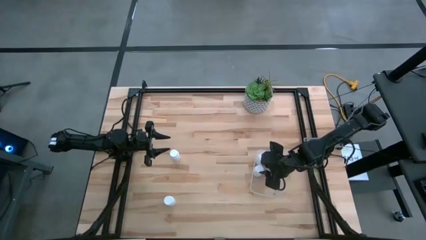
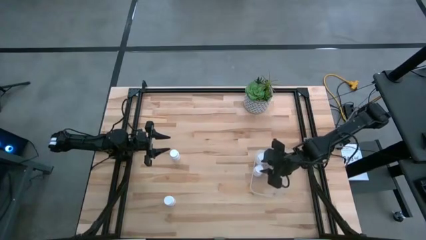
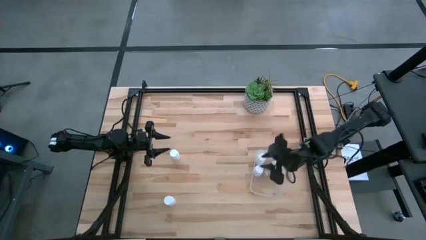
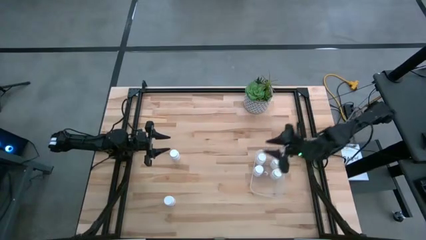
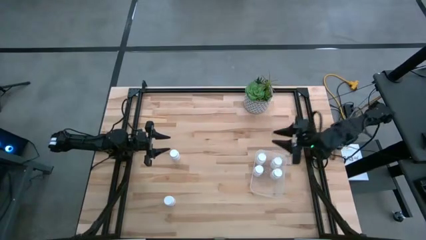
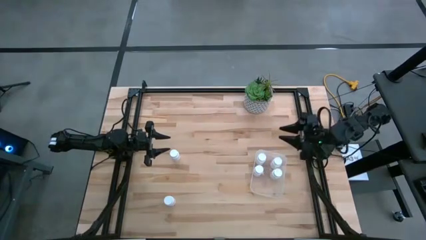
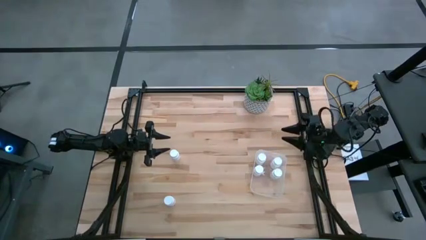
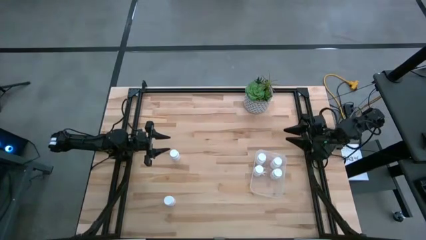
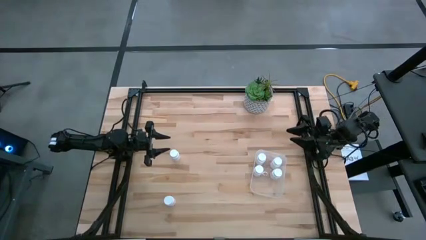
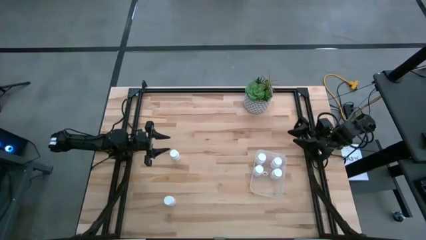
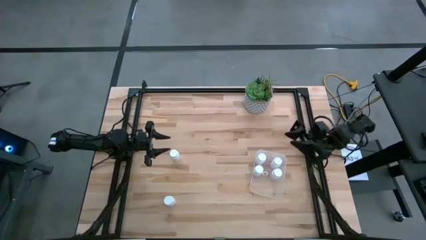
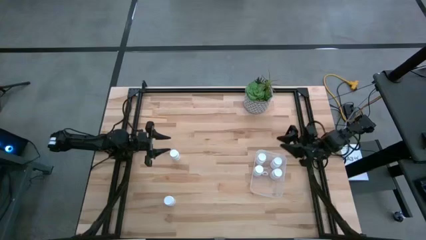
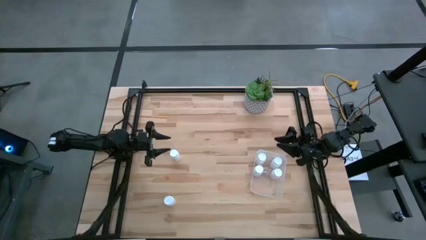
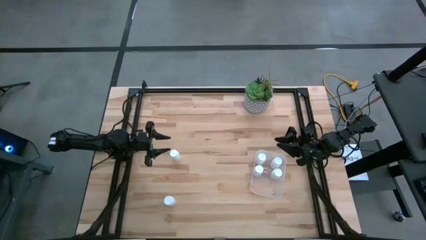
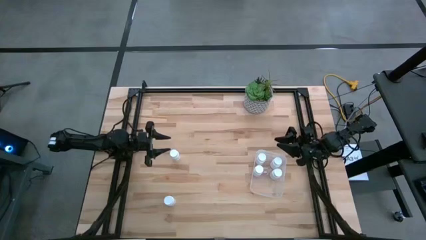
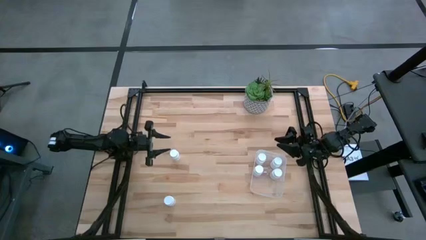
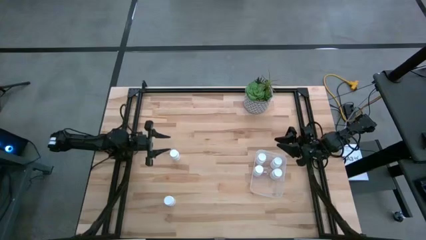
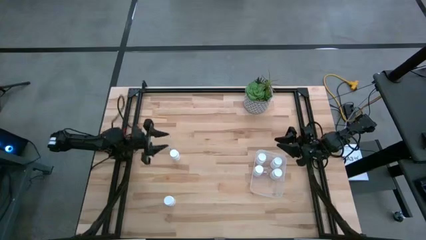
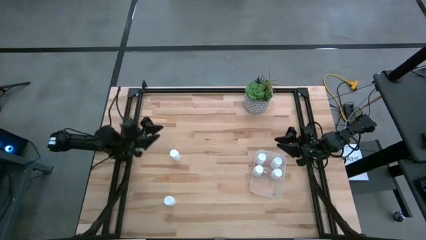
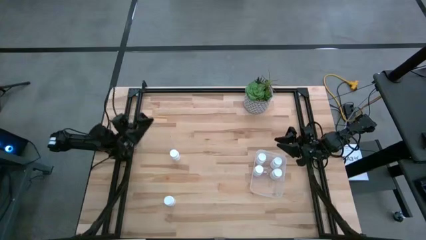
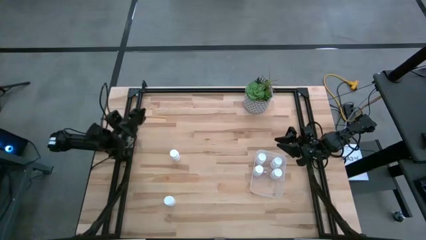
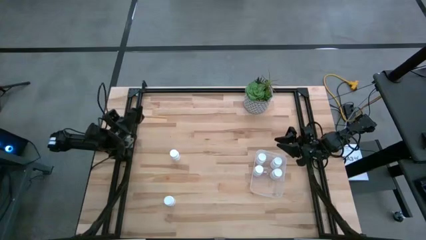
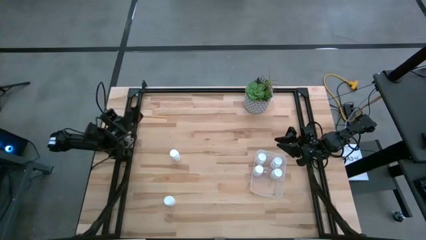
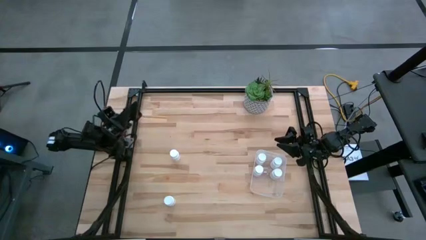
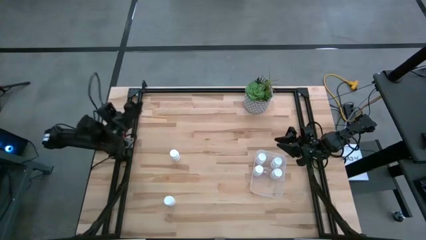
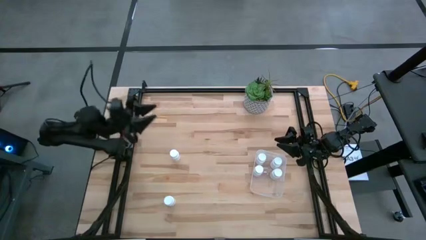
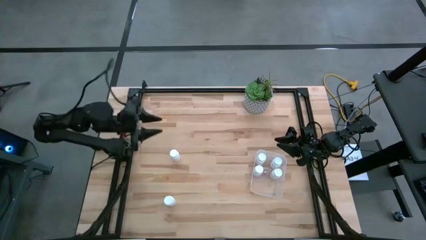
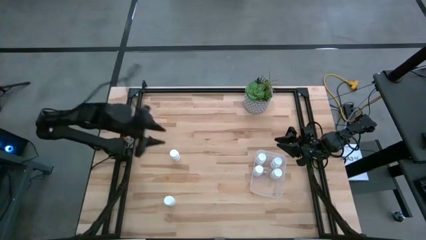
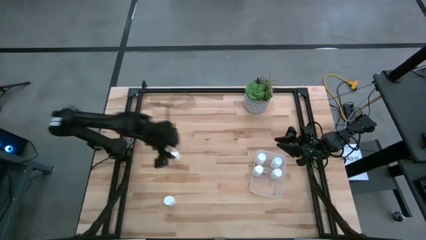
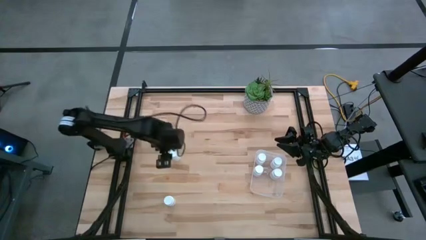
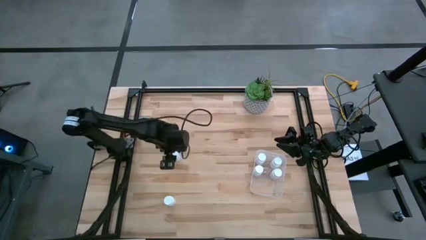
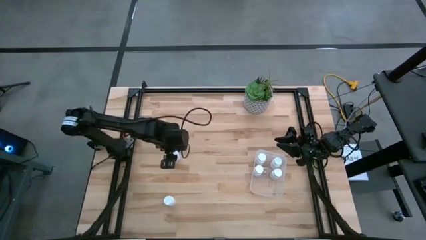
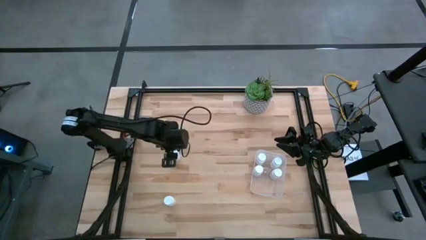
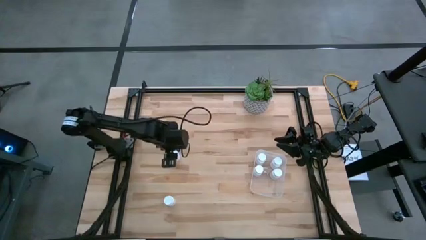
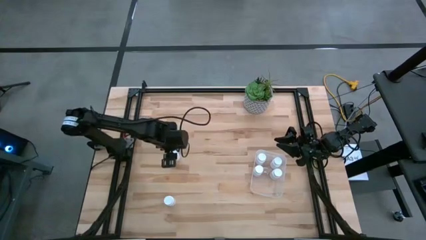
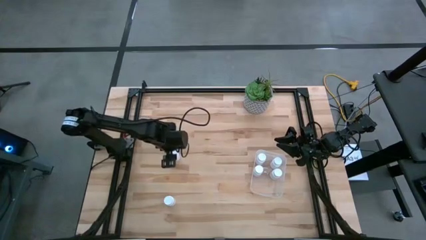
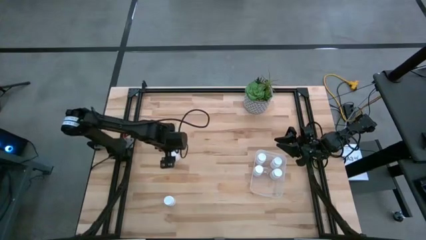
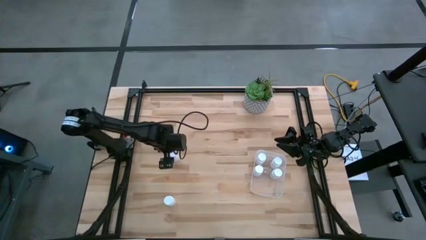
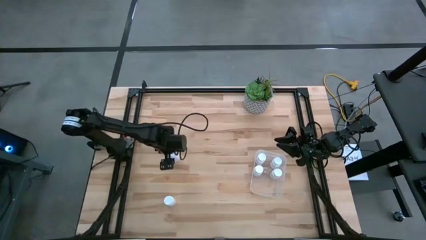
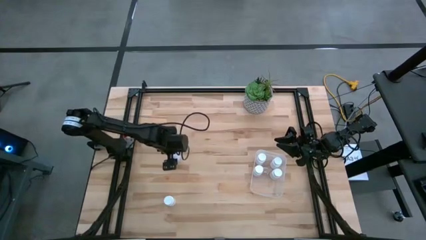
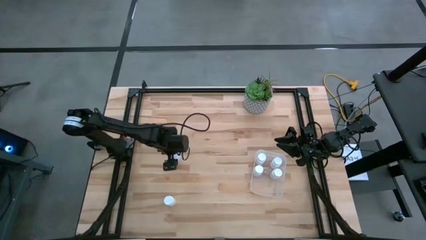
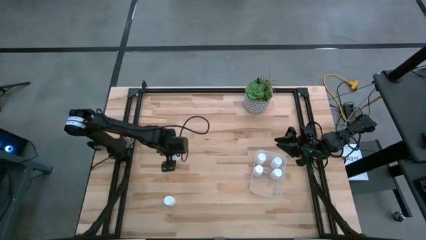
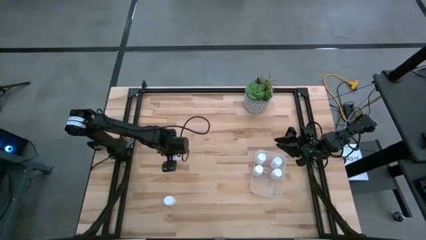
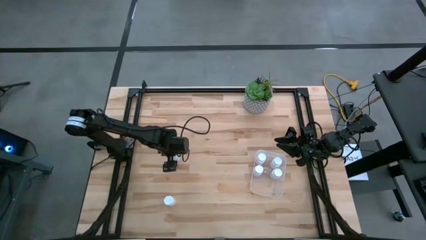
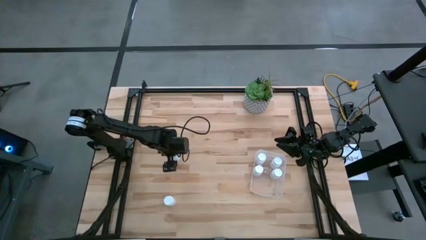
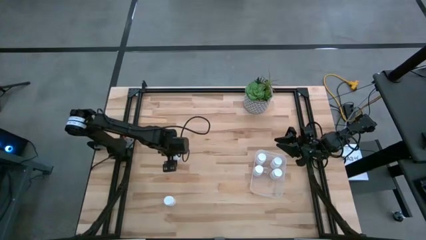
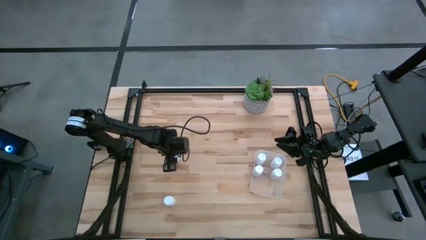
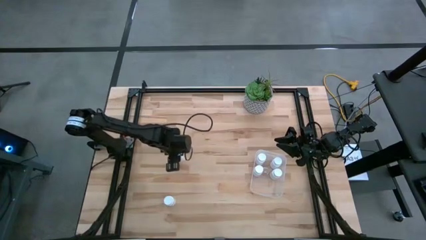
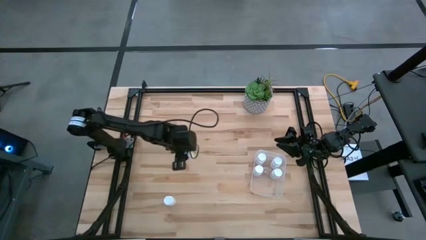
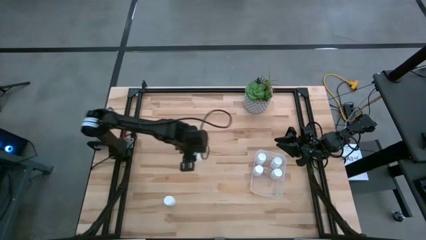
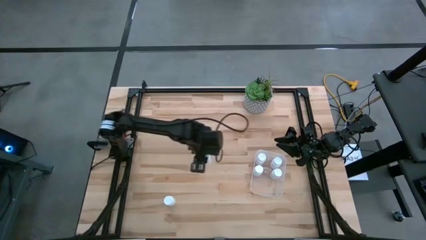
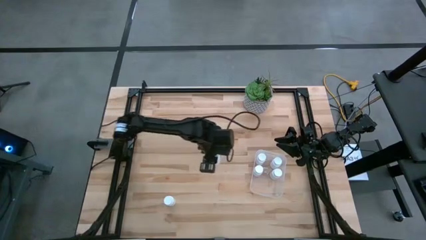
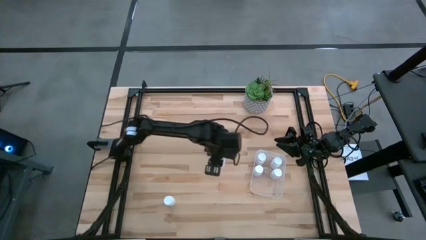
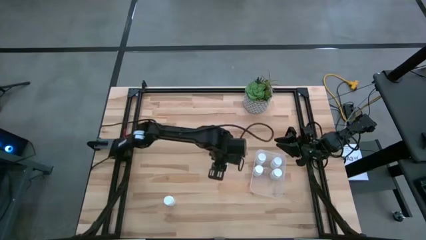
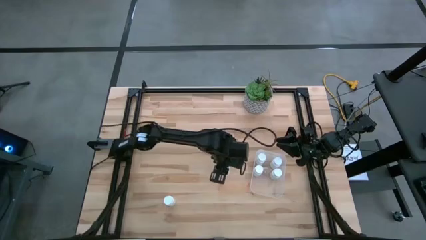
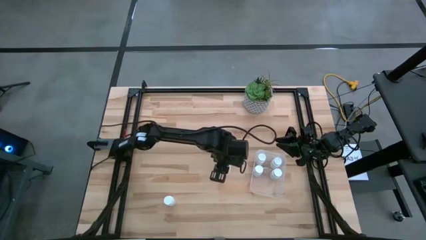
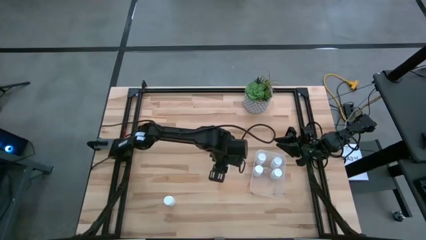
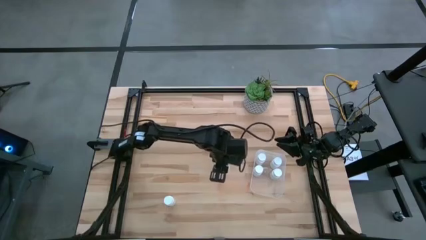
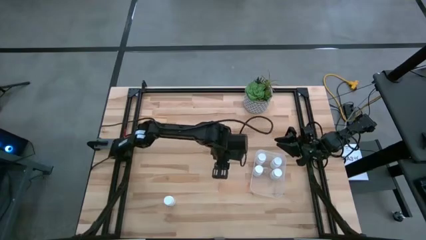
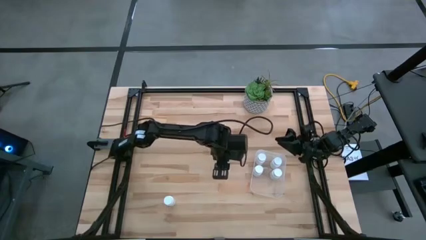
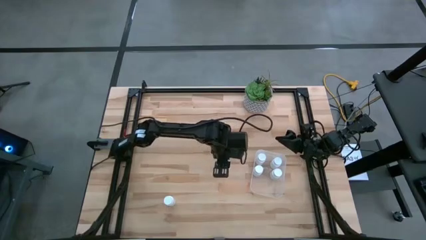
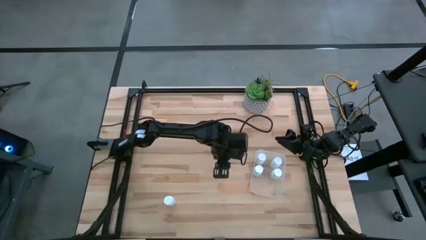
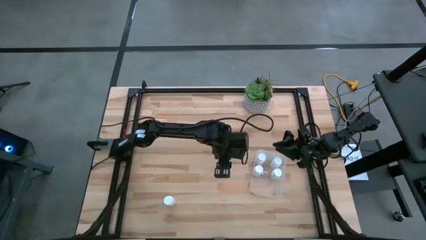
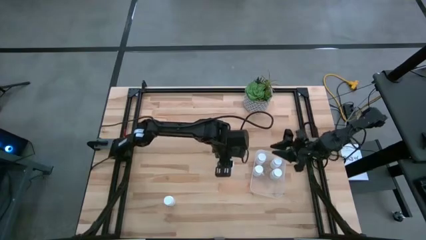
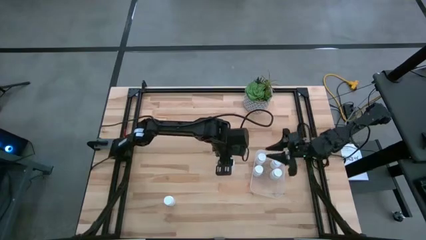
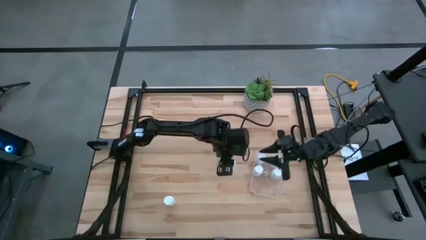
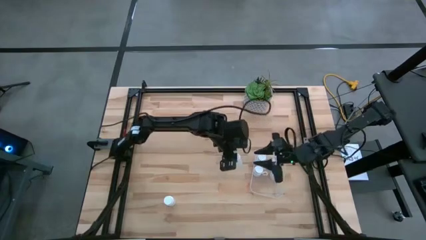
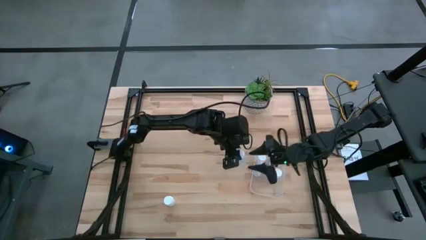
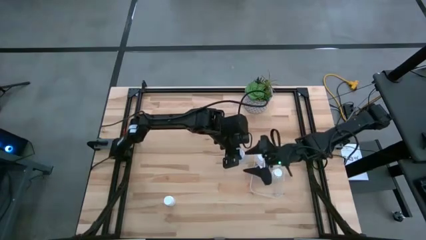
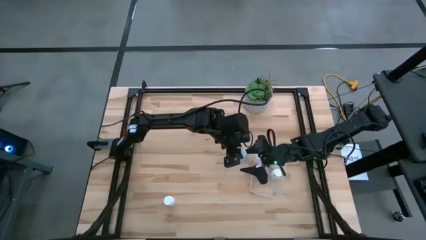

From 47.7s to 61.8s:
Task: Pick and place pill bottles into a basket
Put the white medicine bottle into the transparent bin
